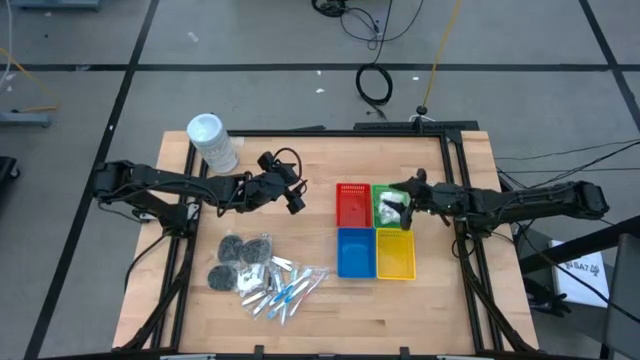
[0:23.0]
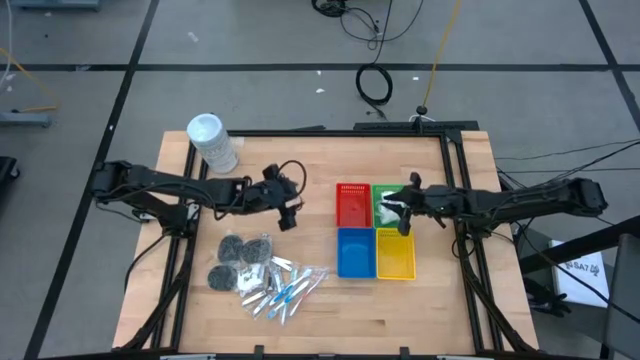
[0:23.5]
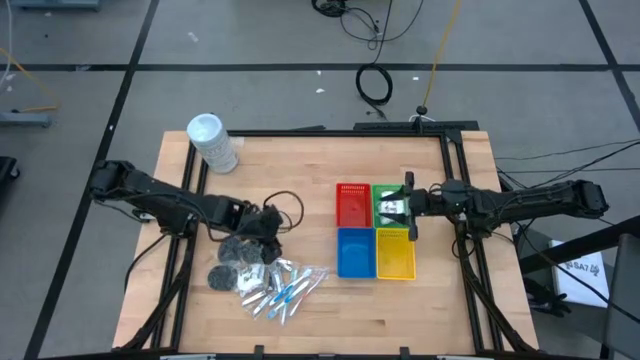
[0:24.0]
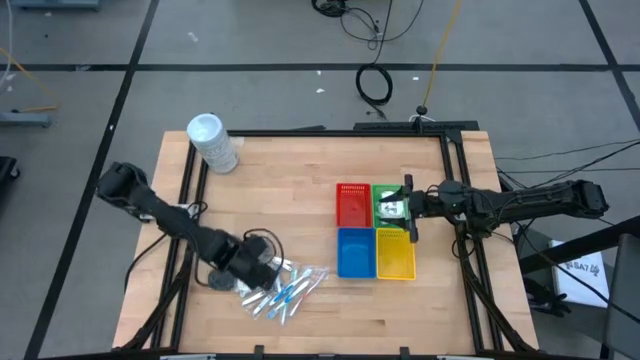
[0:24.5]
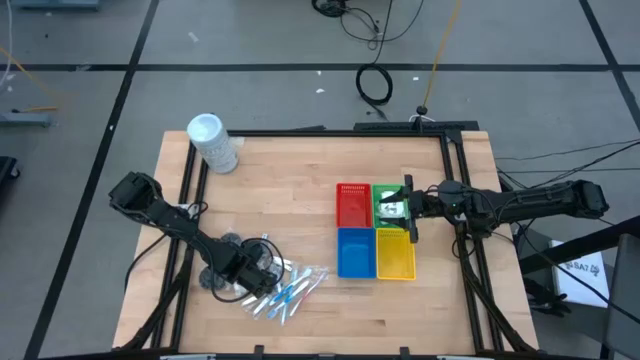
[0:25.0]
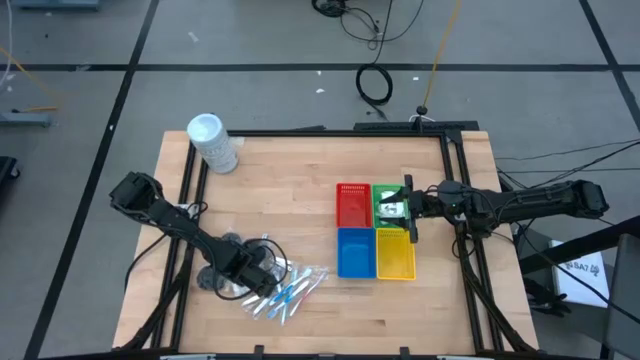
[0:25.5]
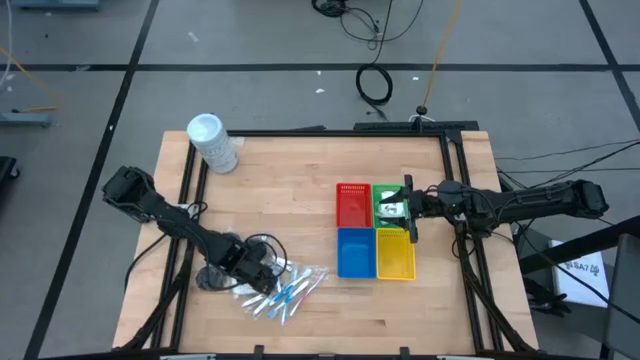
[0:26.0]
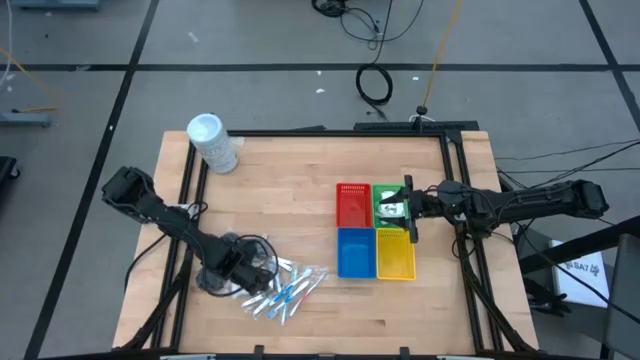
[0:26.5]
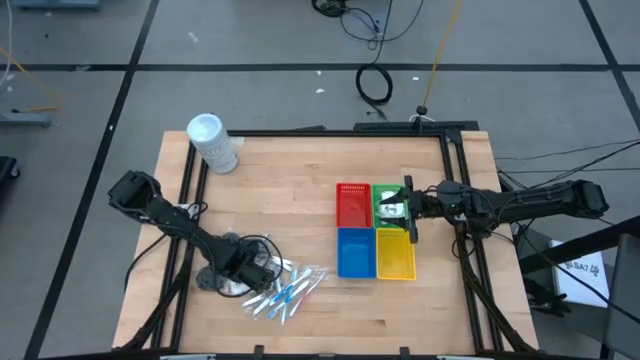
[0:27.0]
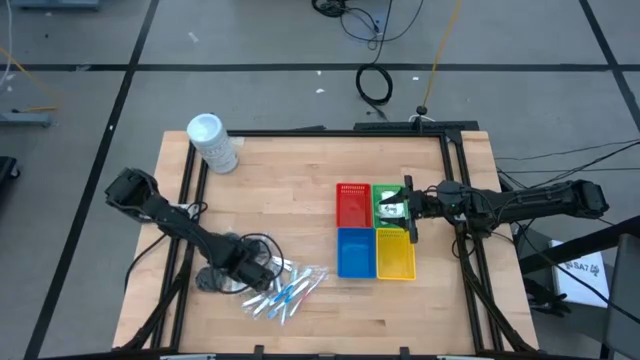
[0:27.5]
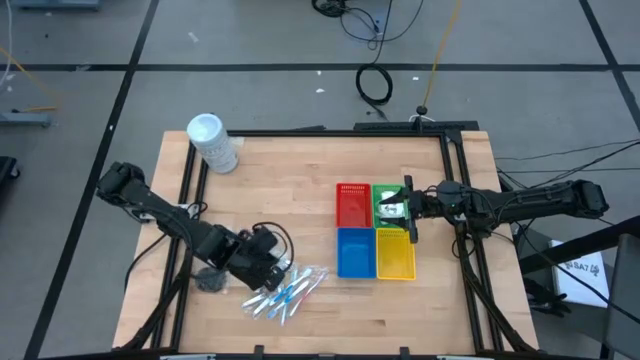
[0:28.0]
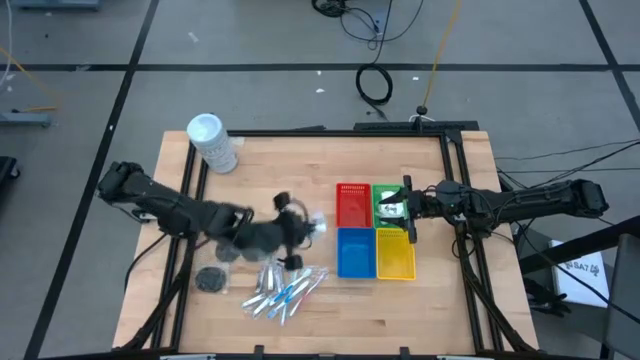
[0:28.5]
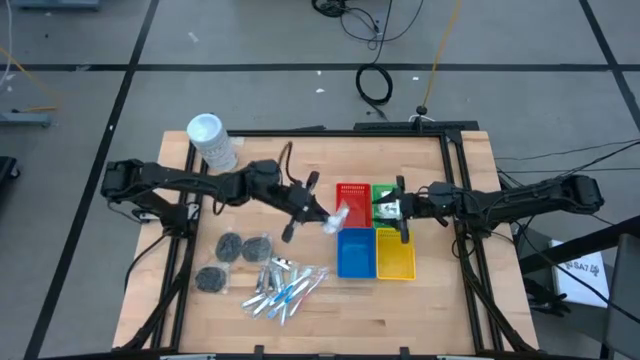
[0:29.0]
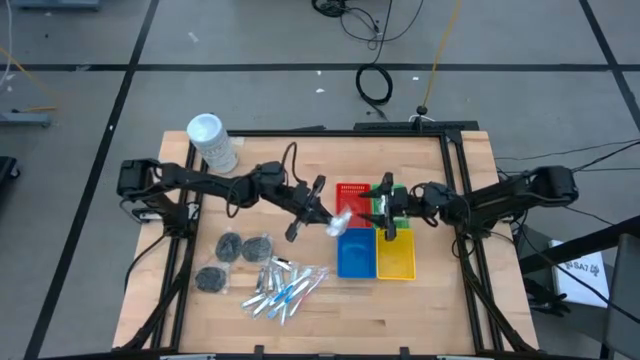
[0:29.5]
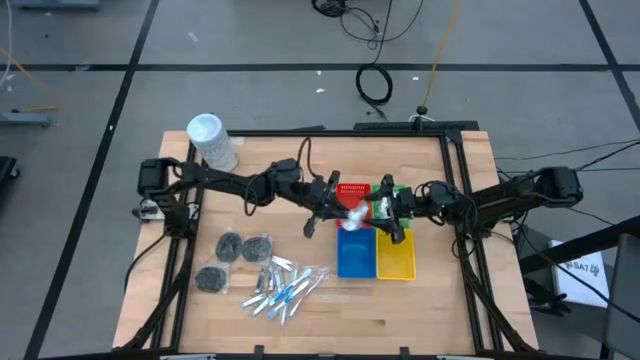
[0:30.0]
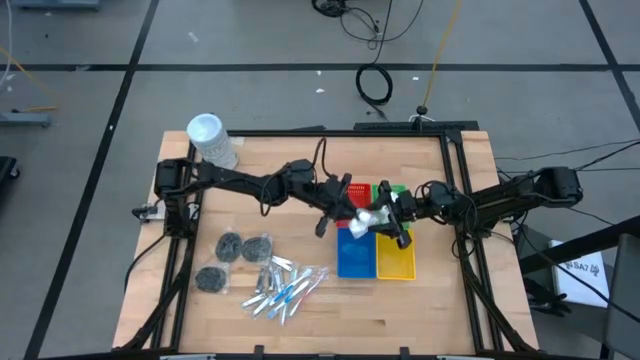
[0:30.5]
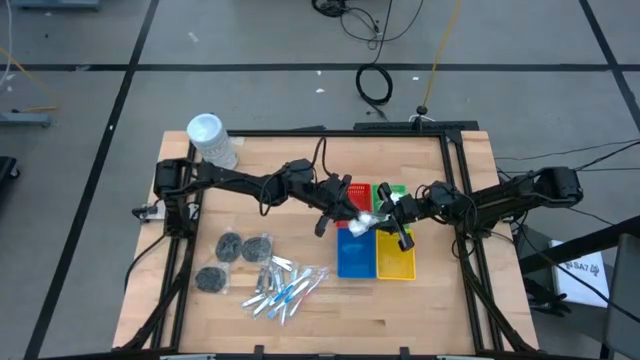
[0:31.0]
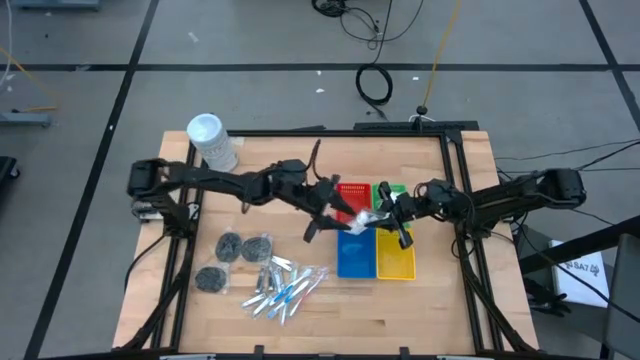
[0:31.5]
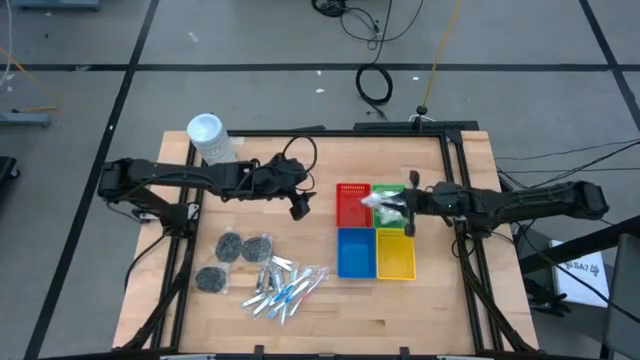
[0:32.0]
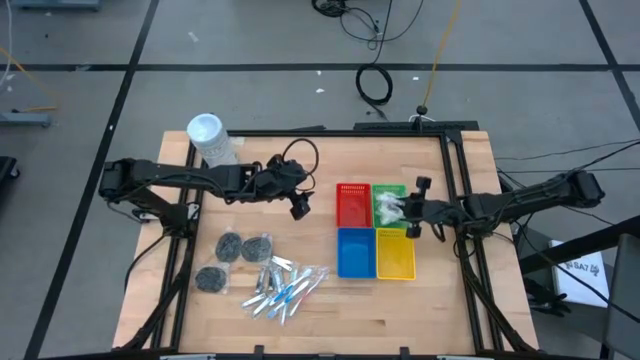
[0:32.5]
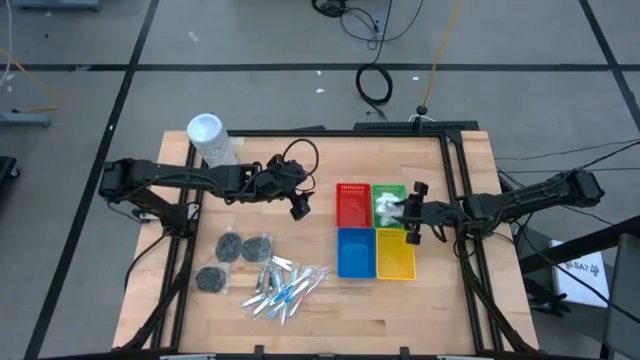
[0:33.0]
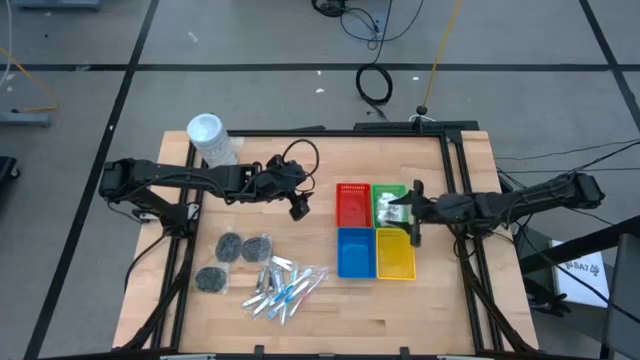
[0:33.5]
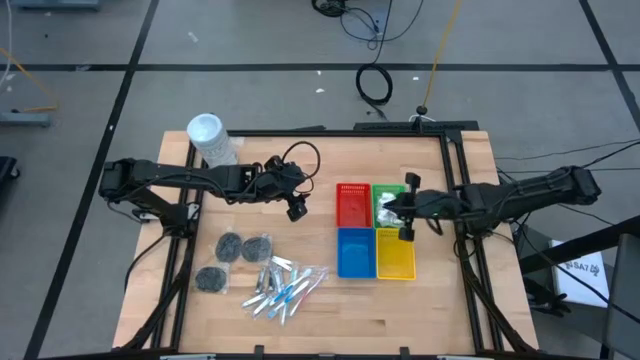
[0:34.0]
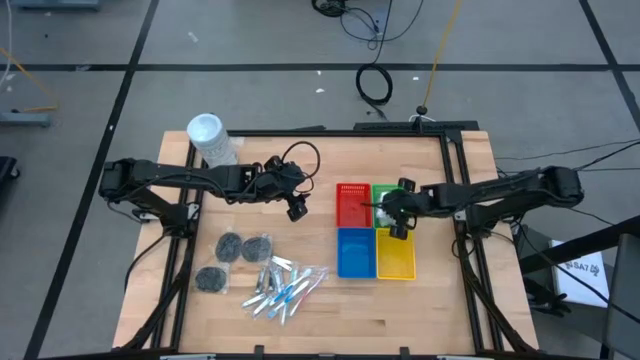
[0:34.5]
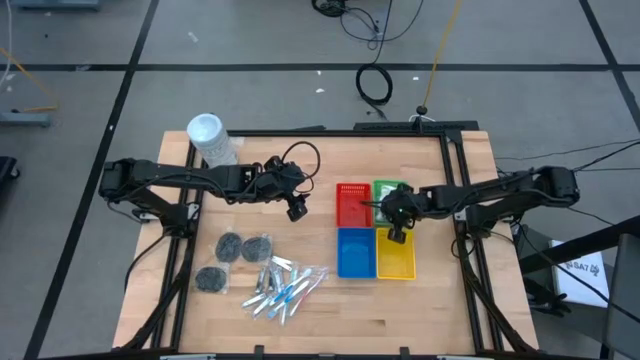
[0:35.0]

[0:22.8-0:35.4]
Task: Pick & Place Travel size toiletries
Put the cotton pack into the green bin

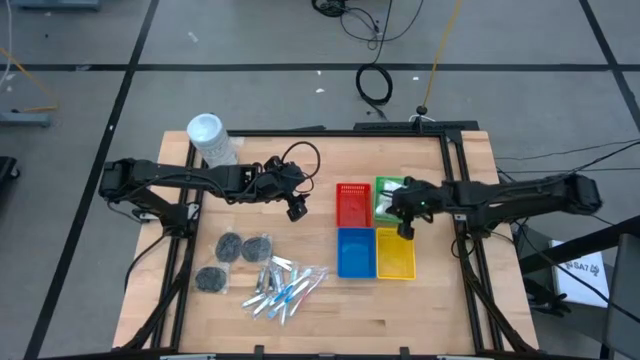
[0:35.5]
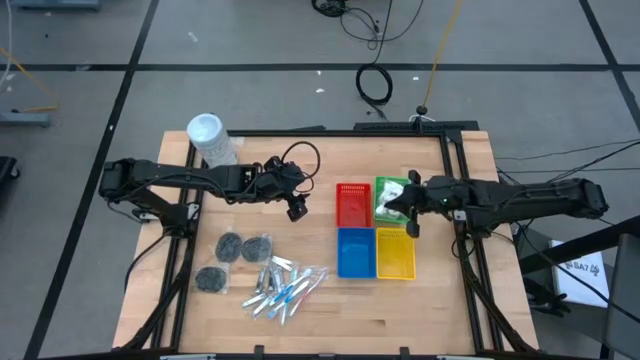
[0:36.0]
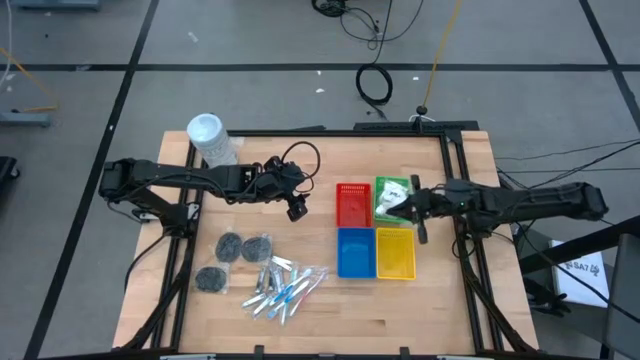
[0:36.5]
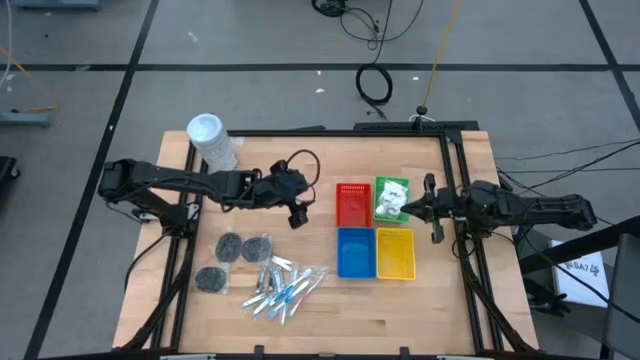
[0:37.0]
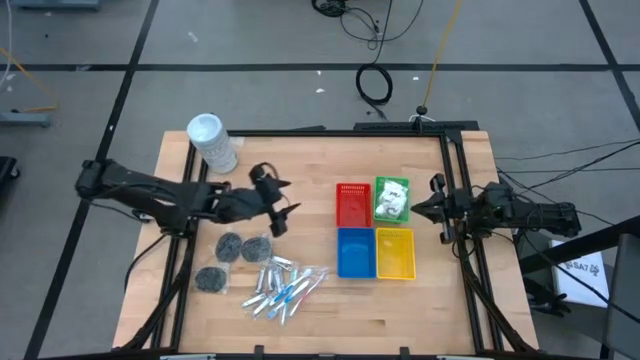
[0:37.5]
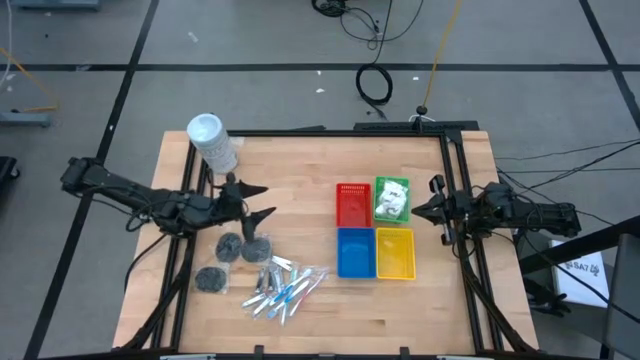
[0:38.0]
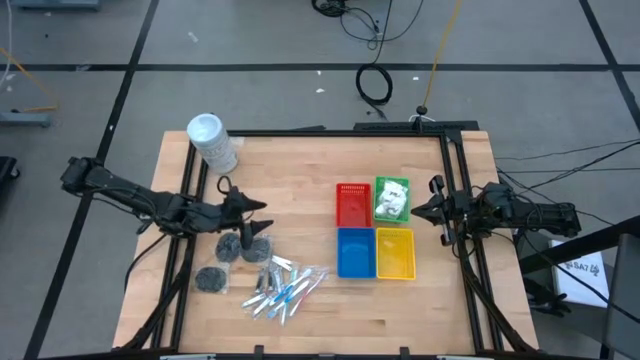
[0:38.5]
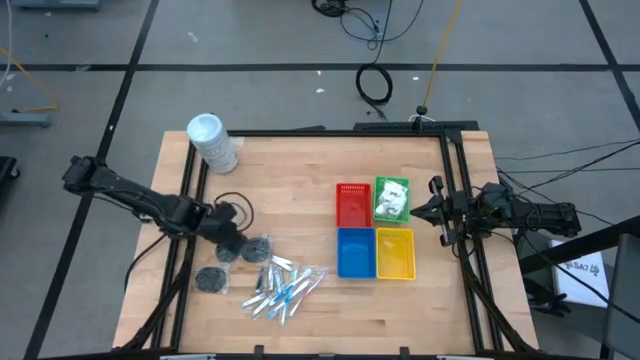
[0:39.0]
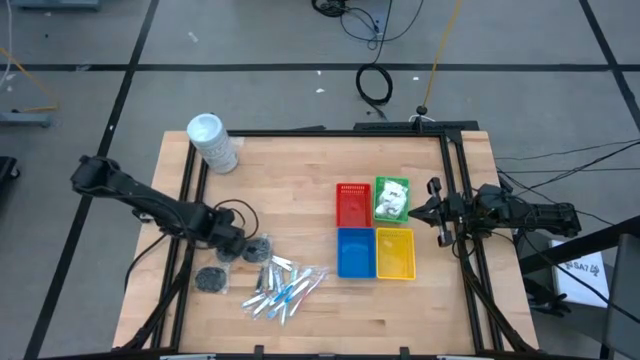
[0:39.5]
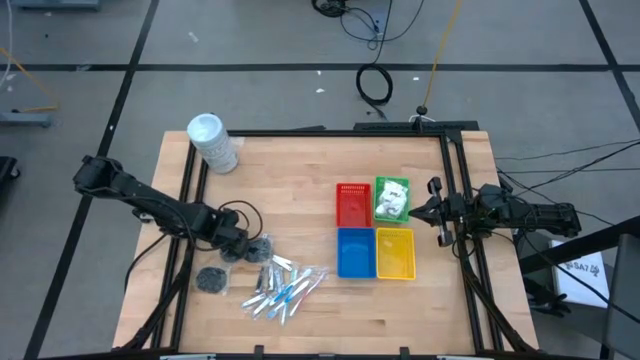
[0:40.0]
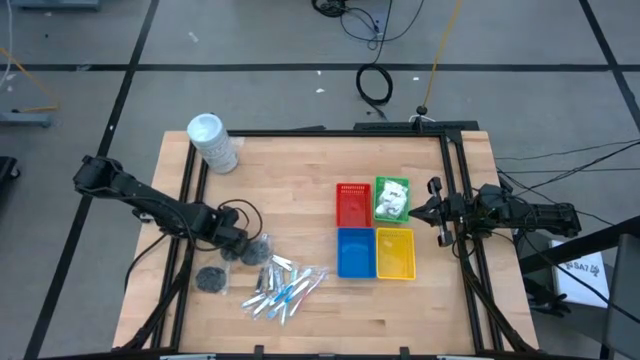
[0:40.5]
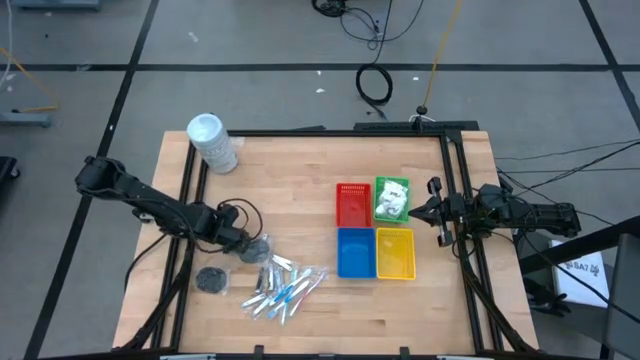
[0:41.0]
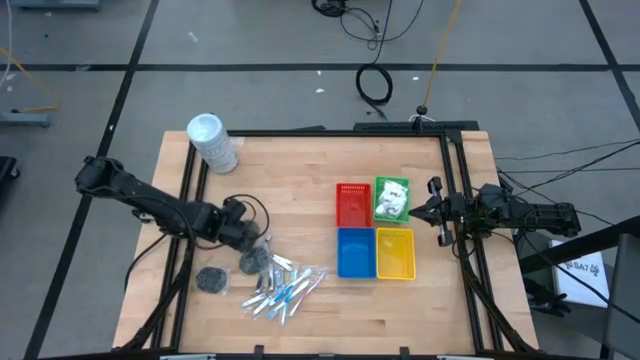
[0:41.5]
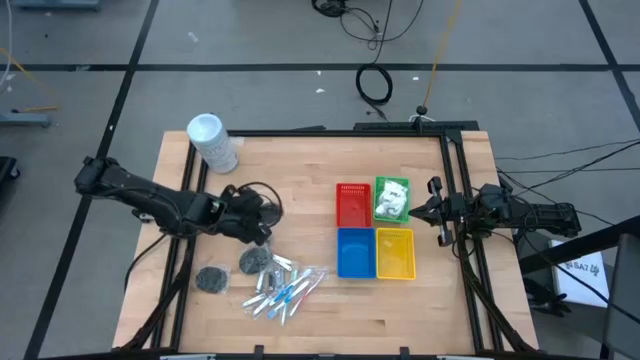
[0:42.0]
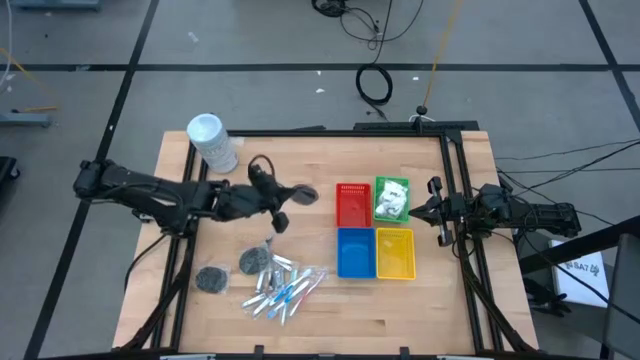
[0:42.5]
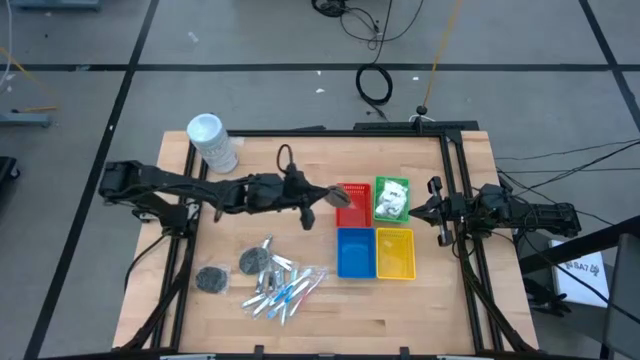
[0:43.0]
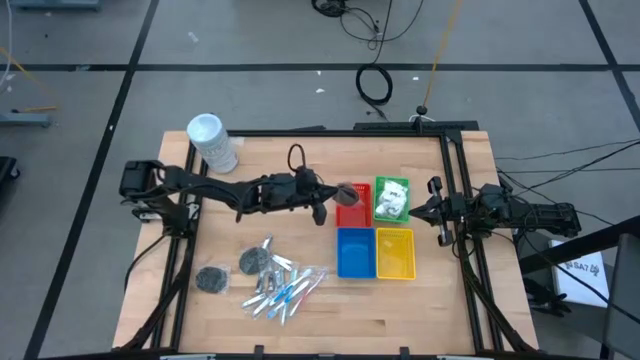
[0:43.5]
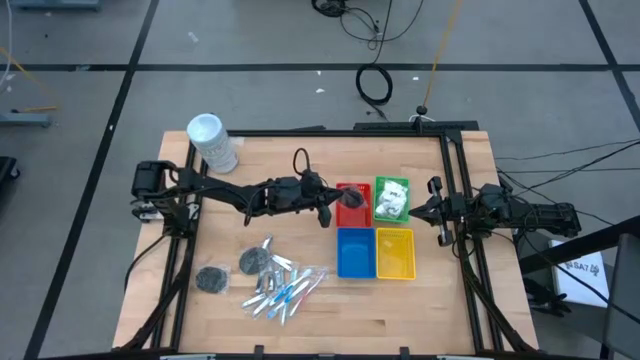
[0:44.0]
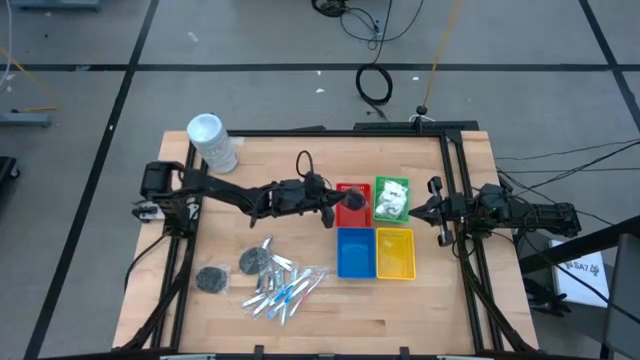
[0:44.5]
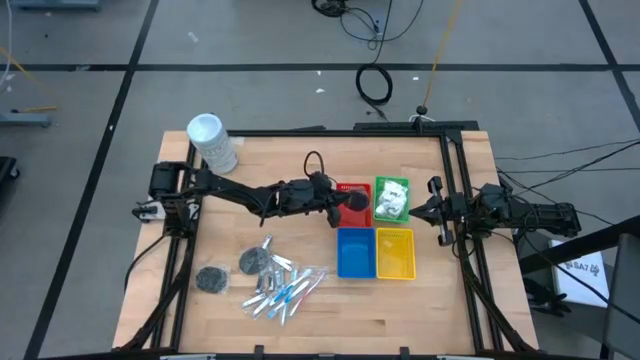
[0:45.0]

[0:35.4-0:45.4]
Put the black hairbrush into the orange bin
